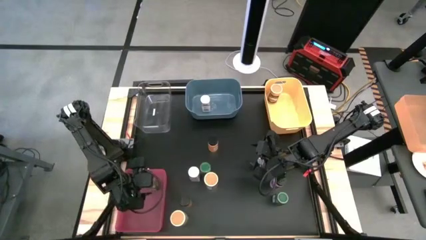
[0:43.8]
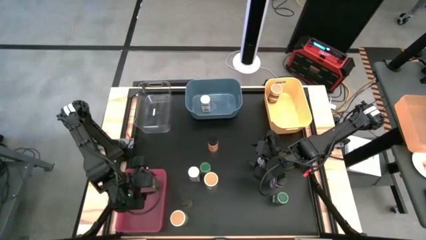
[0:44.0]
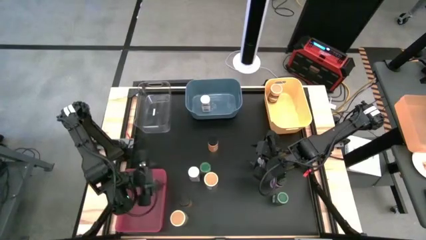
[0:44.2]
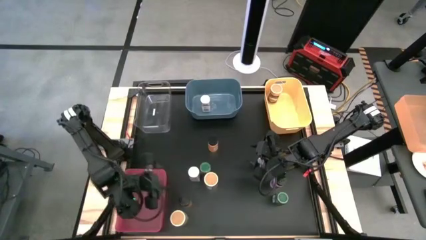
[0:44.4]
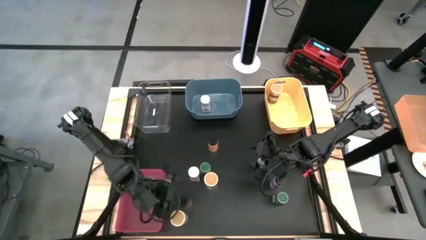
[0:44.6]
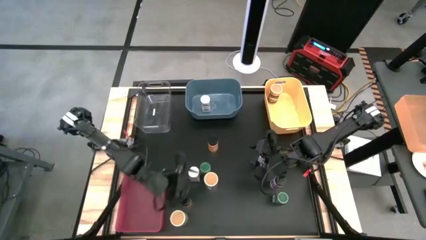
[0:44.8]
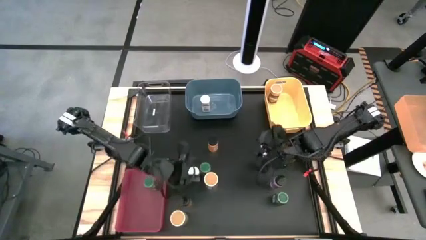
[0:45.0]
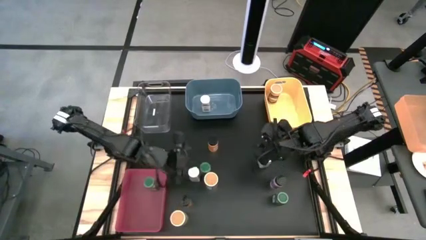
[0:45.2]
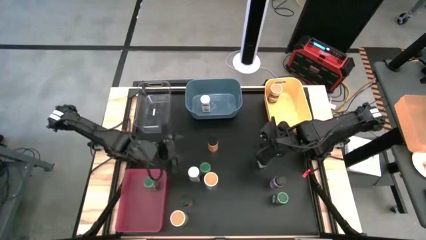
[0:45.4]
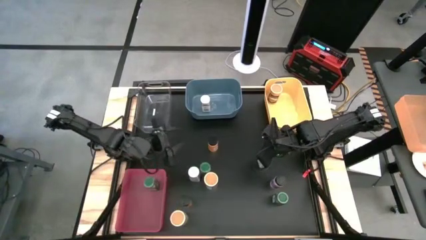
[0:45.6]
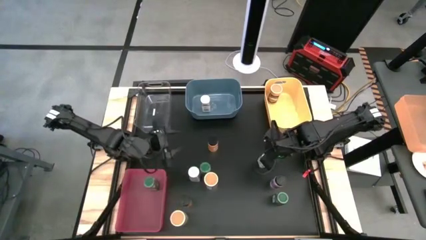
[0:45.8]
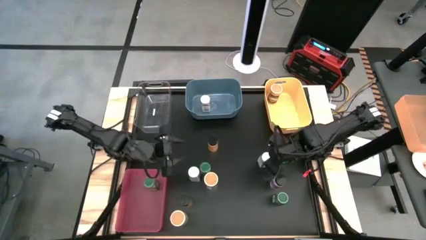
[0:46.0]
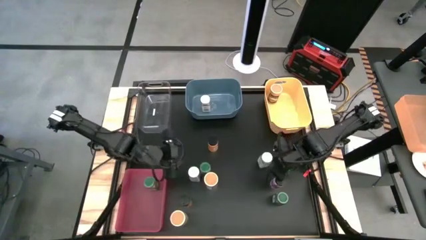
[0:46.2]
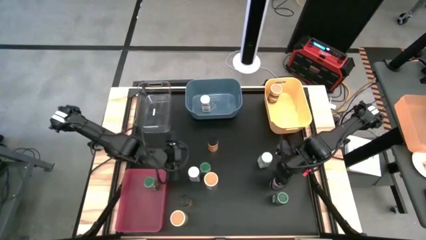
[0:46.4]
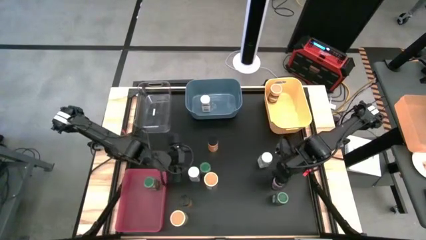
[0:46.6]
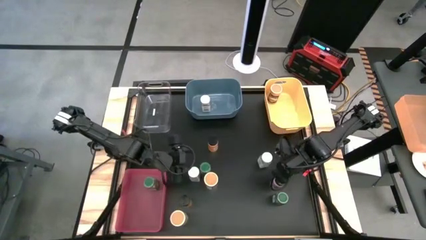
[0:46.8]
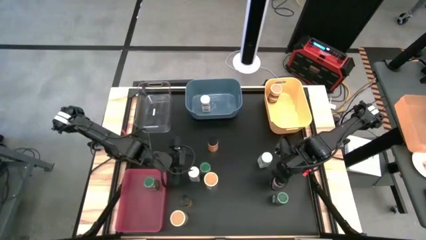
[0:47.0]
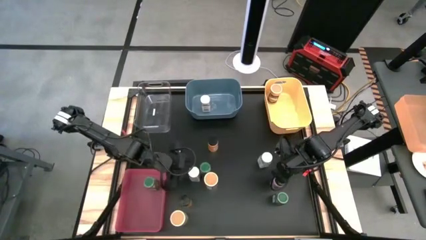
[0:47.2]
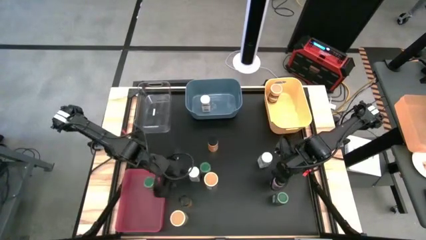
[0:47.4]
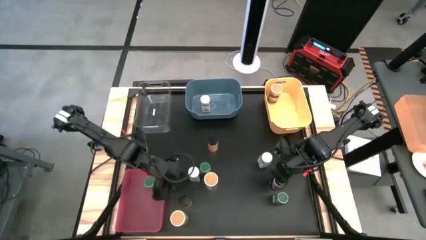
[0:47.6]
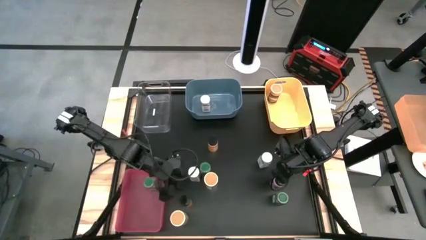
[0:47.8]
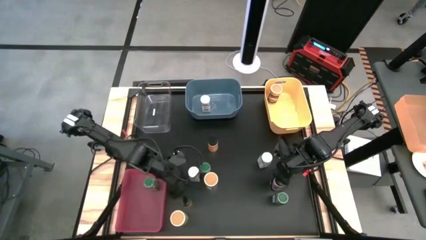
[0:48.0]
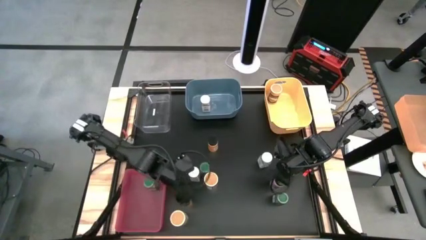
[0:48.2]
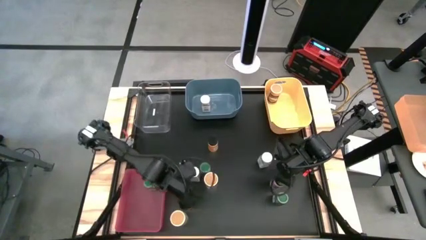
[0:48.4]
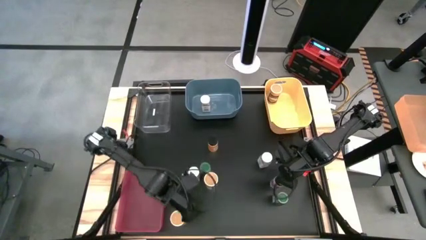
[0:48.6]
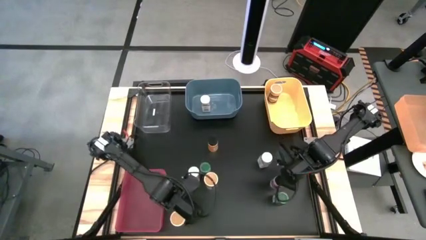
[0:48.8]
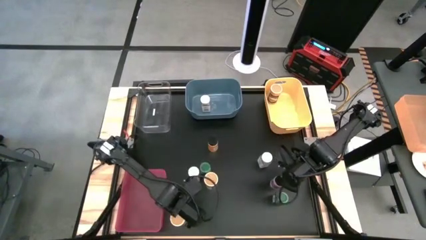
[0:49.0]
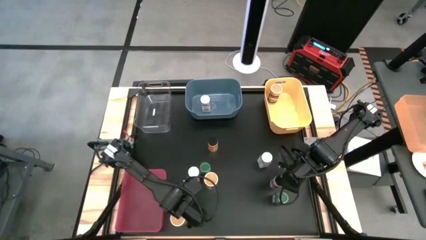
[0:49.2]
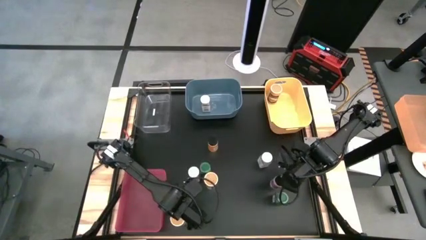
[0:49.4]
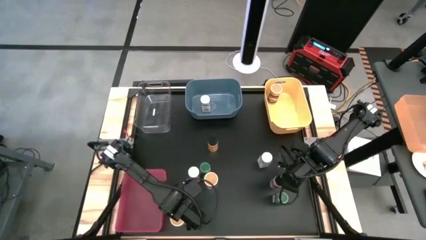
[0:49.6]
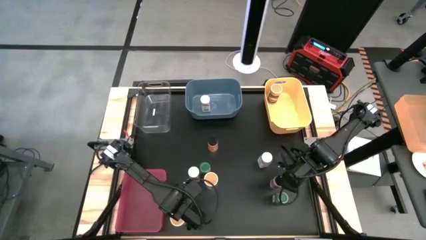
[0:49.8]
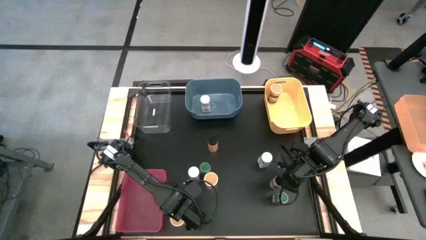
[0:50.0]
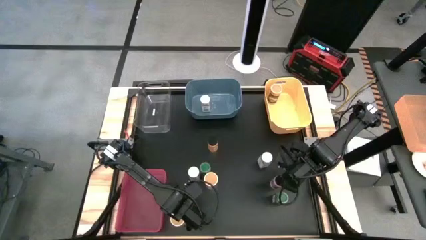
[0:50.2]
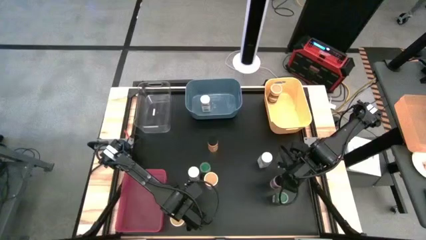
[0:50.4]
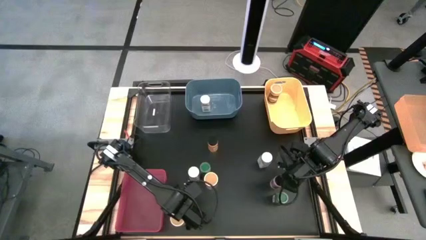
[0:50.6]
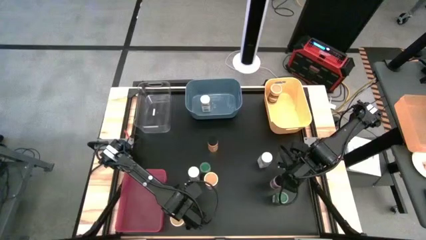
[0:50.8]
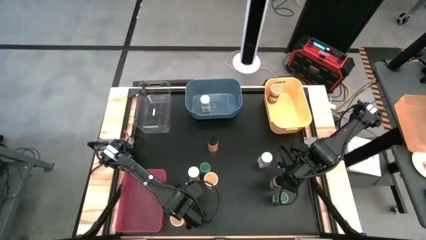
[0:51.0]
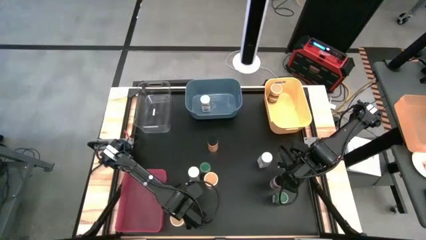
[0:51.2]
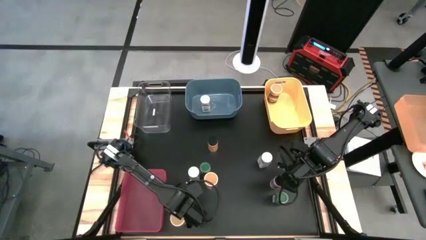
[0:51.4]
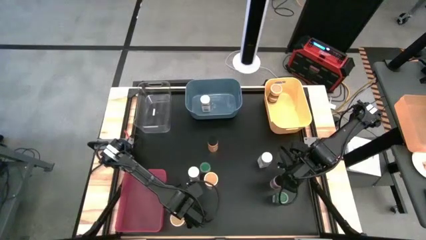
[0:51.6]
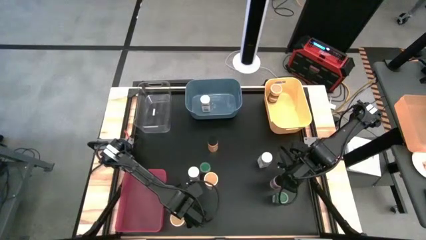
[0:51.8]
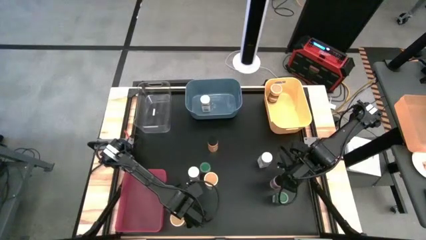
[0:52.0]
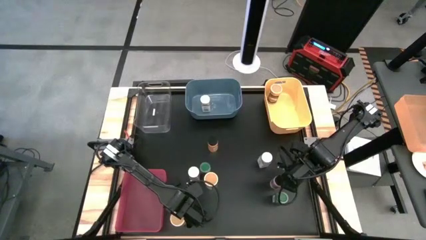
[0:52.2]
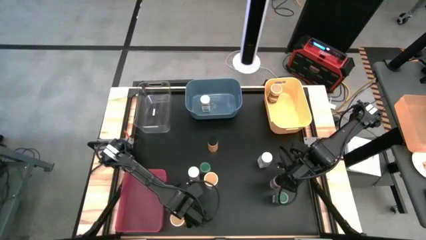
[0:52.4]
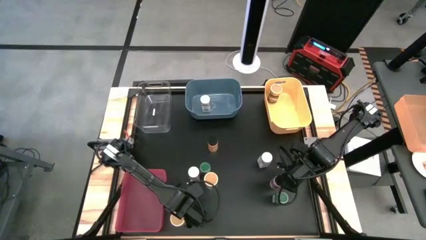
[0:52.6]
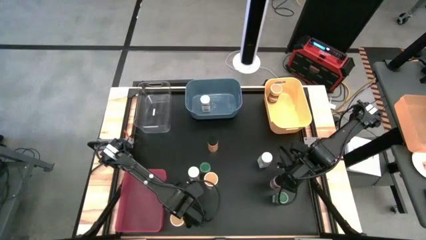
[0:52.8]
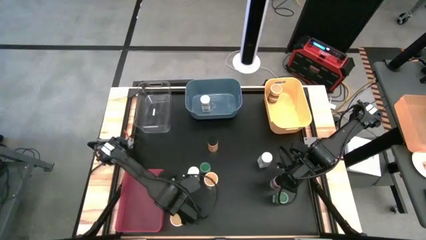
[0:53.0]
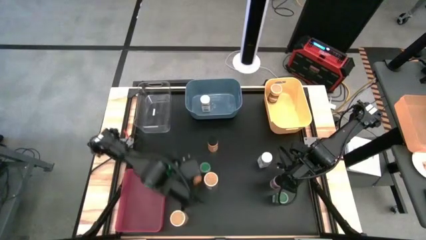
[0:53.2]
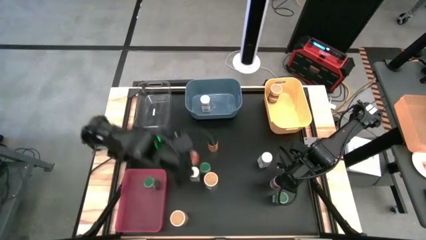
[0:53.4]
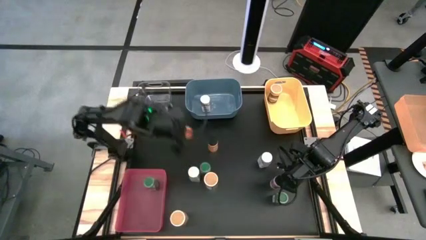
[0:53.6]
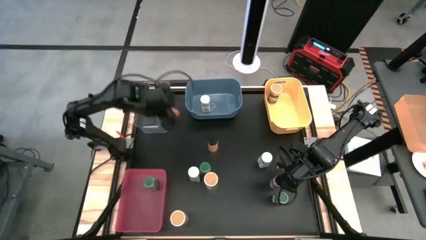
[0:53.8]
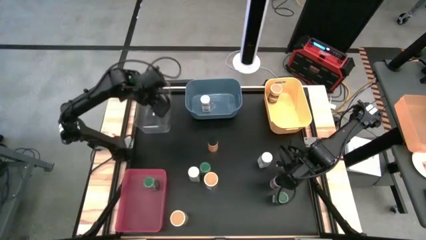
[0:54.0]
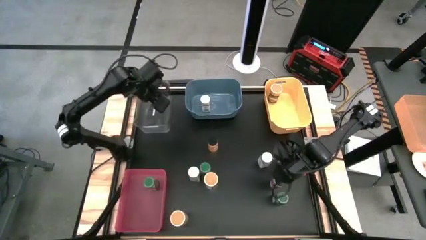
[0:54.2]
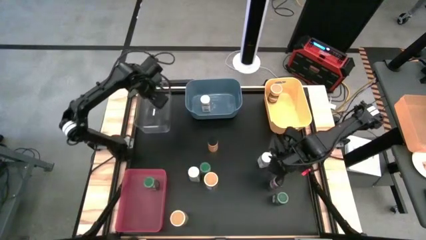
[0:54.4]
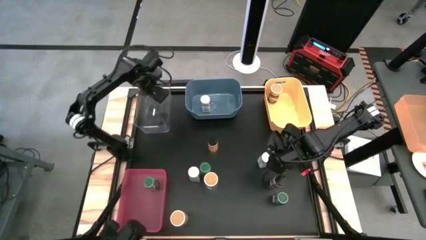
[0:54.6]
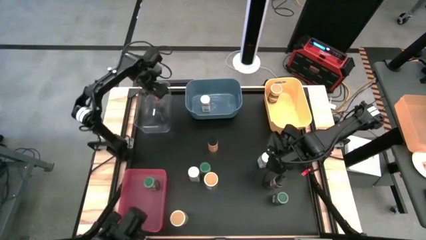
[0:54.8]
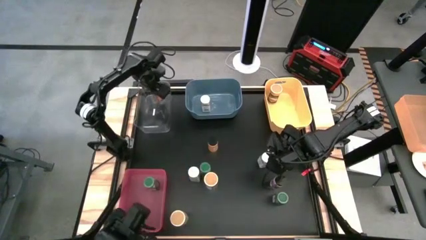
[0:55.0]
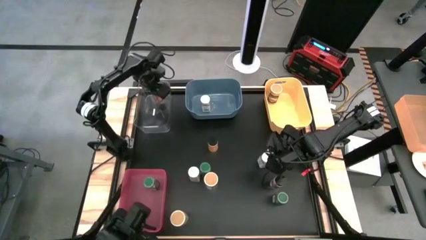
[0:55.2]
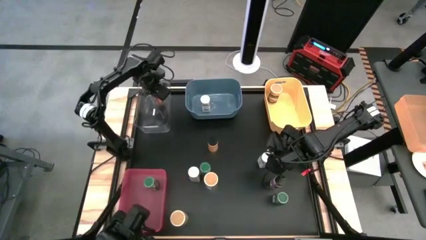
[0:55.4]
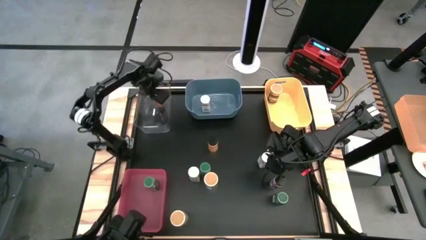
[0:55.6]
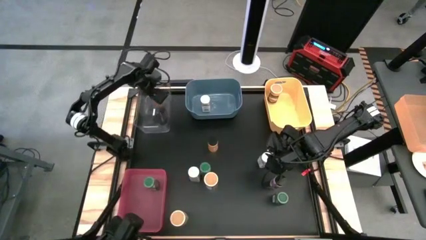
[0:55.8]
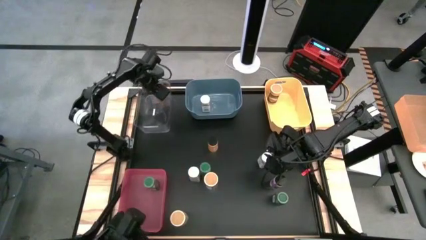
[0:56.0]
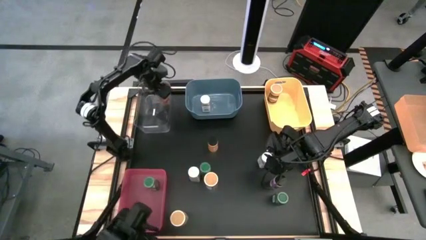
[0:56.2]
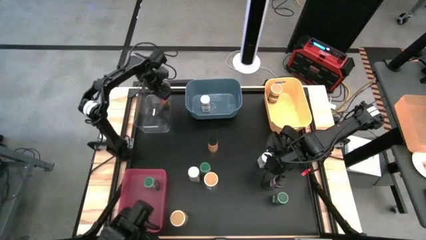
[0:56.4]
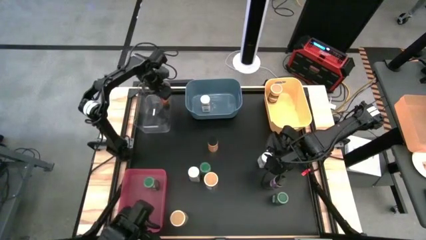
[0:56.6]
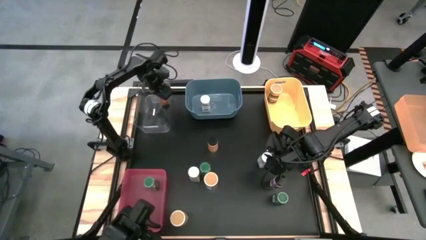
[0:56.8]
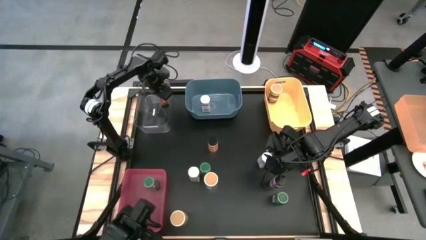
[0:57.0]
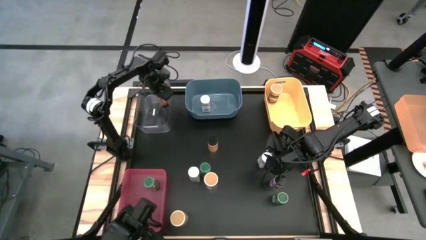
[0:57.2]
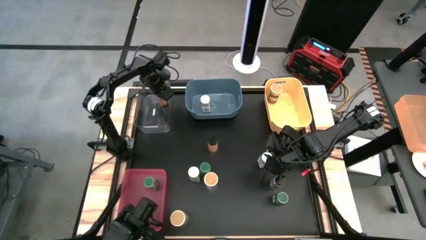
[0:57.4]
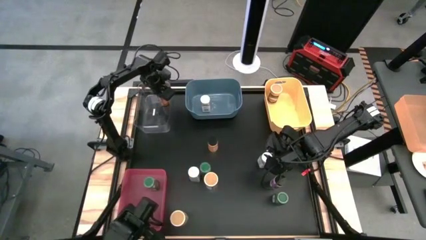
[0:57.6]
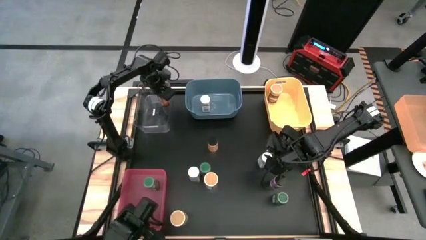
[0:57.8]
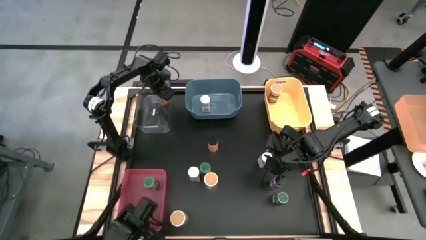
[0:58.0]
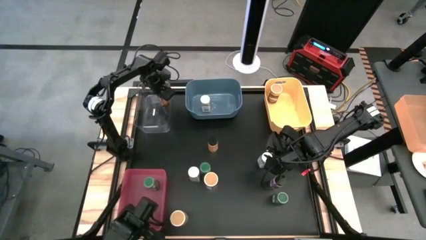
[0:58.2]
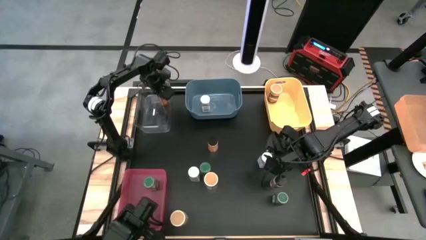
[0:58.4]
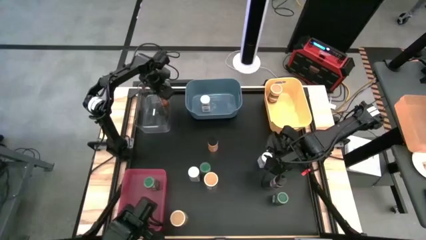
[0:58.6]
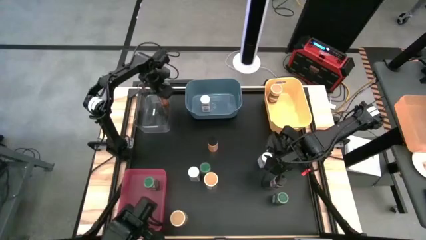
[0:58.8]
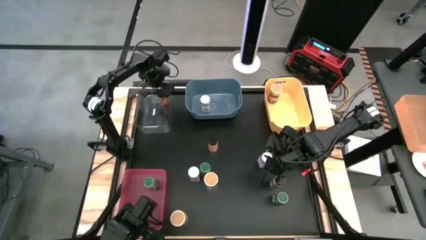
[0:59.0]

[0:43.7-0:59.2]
Task: Sort spices by type
Put the bottom black seasoning bottle into the transparent bin

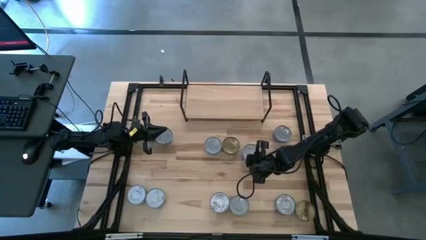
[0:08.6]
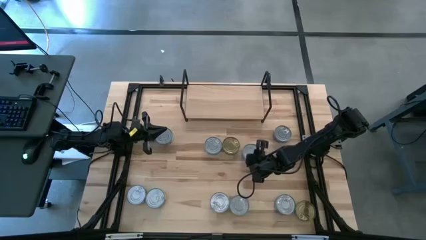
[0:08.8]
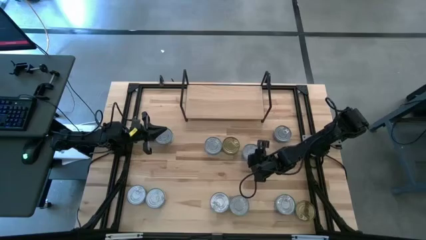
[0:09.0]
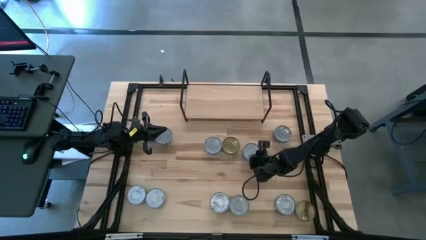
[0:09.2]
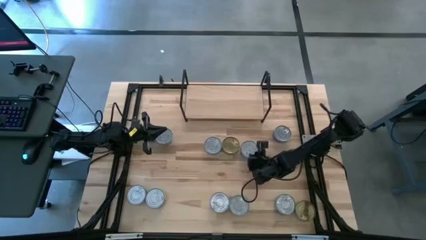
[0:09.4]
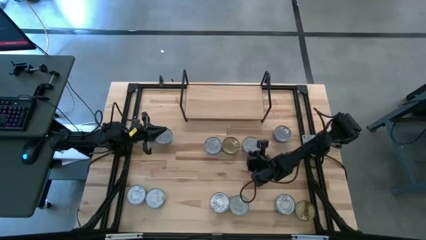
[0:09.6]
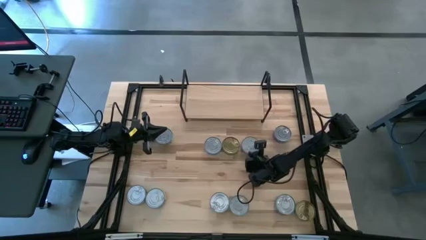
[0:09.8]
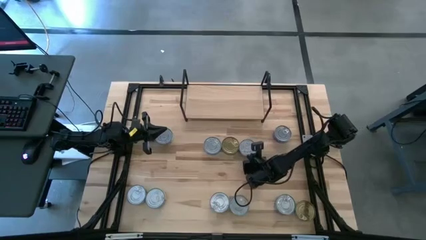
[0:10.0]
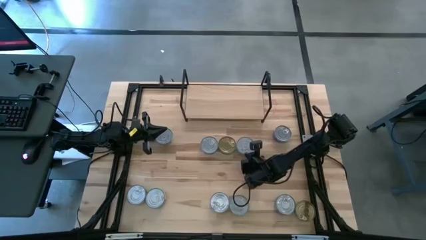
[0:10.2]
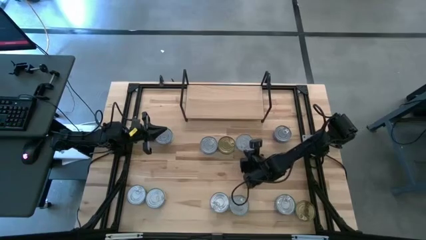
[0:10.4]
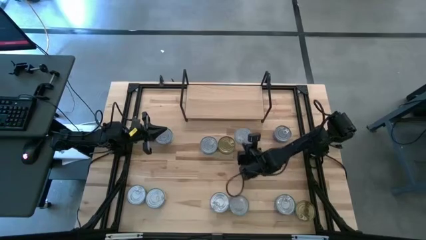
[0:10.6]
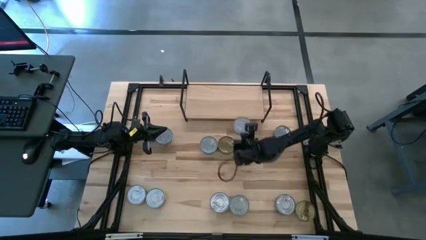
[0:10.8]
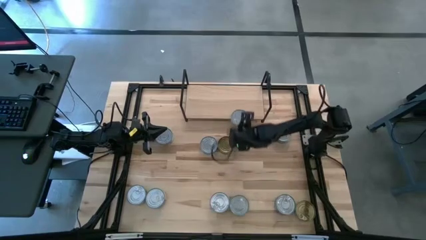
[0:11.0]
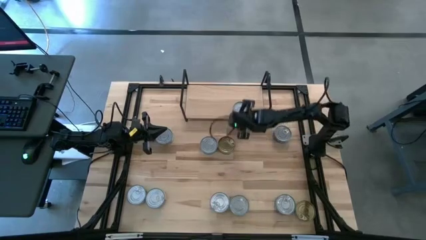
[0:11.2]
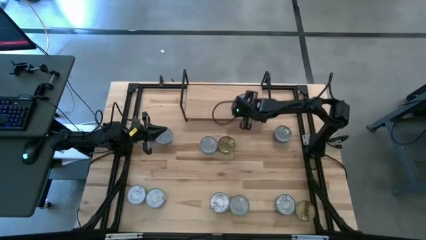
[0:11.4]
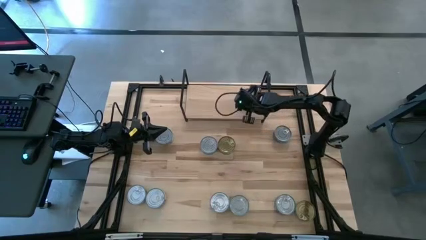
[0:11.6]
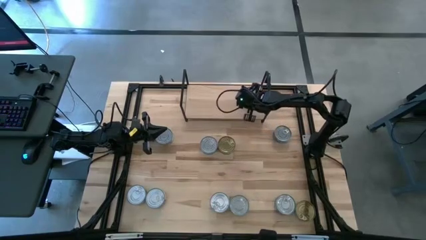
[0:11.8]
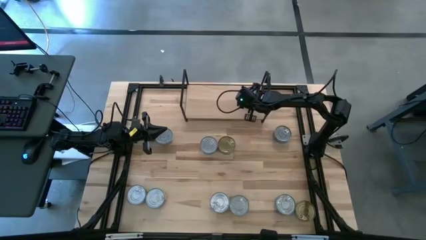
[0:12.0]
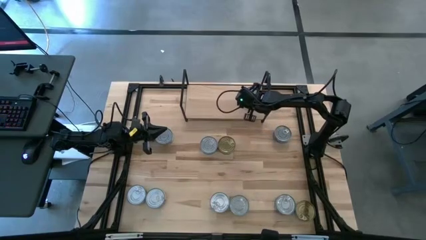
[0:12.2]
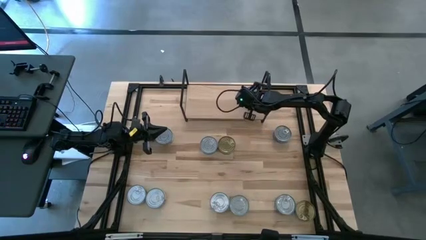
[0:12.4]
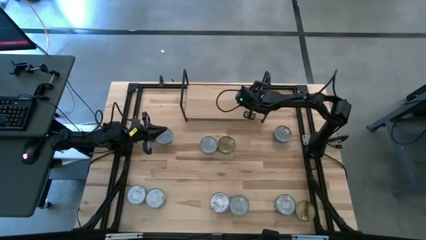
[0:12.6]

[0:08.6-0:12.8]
Task: Stack canned seafood by type on shelf
Put the top right yellow-blue tuna can on the shelf
